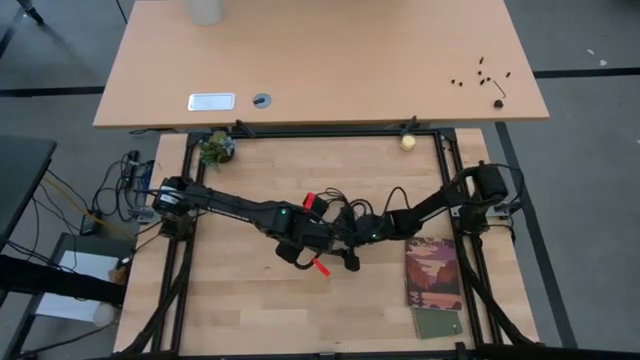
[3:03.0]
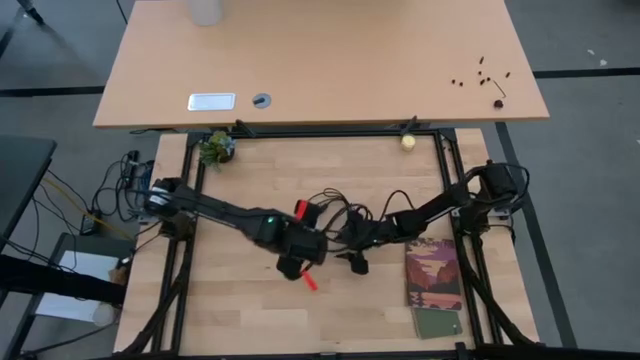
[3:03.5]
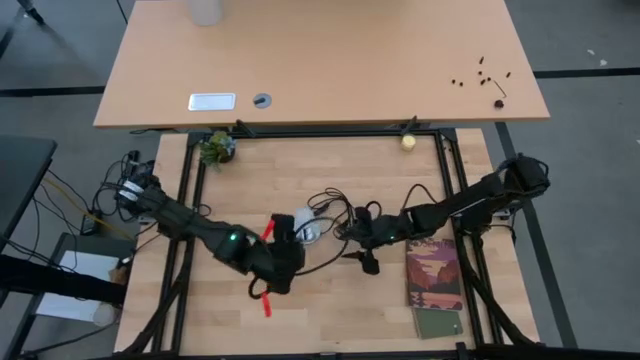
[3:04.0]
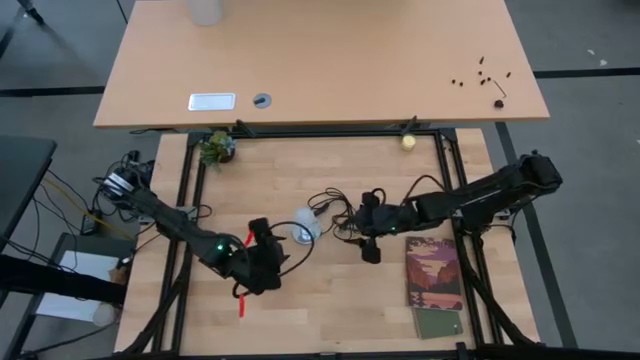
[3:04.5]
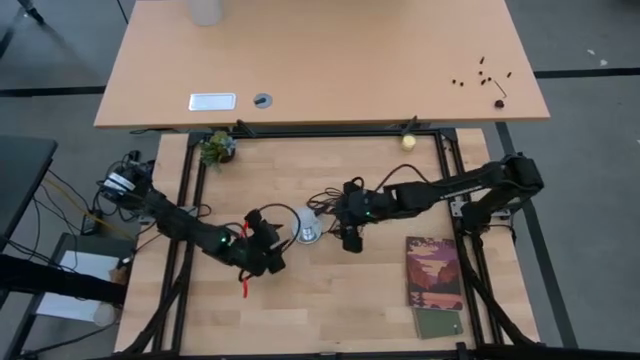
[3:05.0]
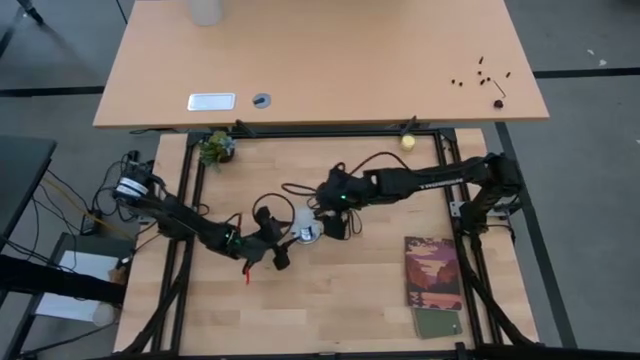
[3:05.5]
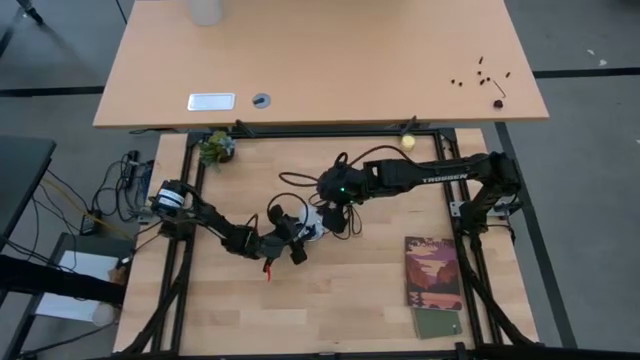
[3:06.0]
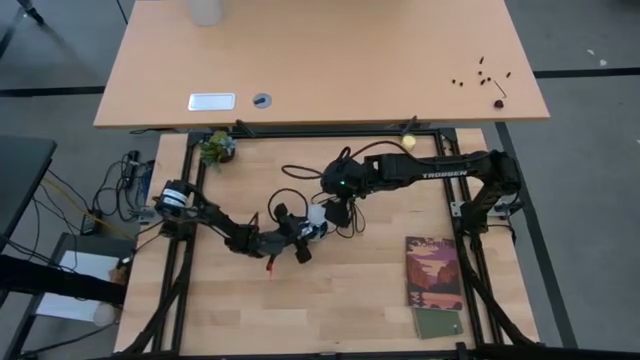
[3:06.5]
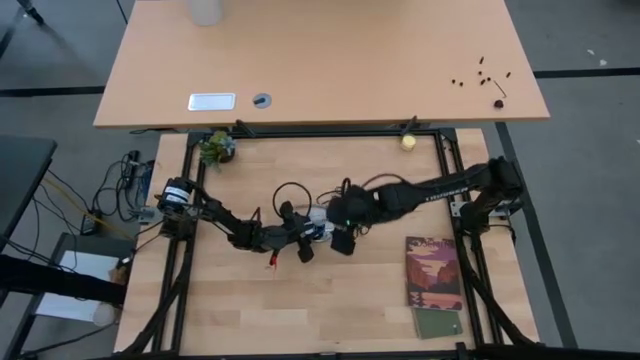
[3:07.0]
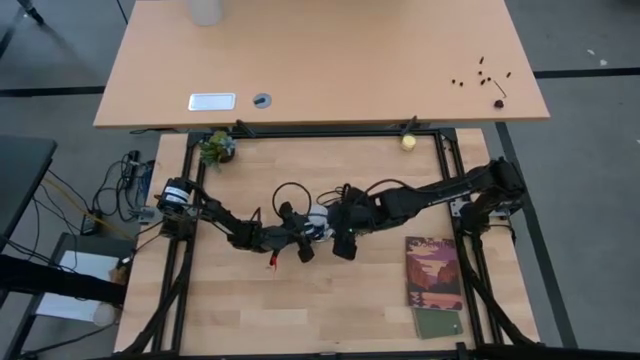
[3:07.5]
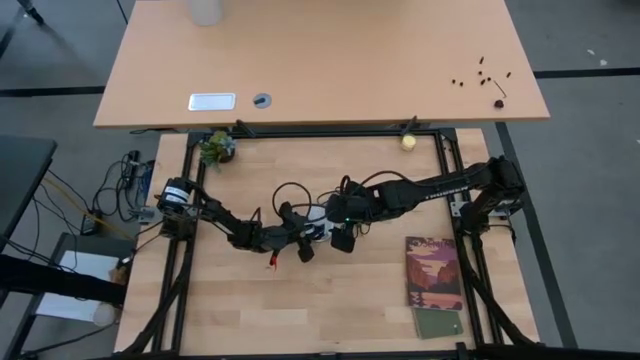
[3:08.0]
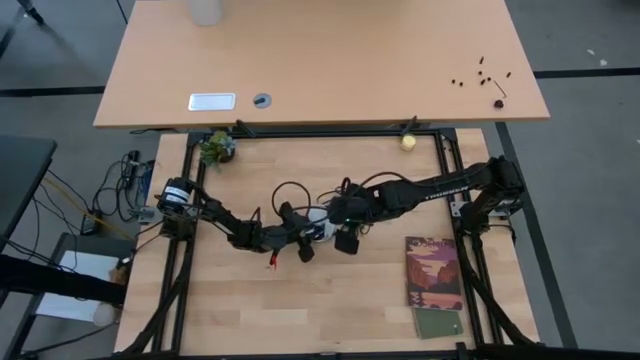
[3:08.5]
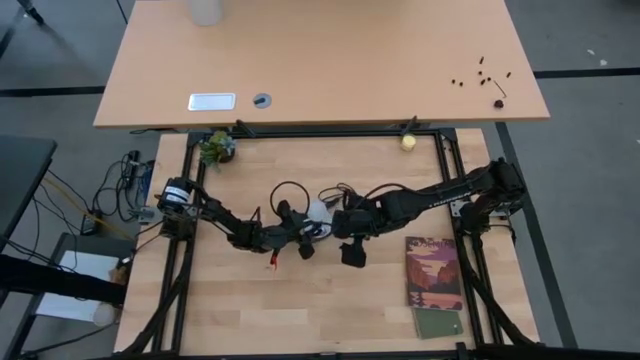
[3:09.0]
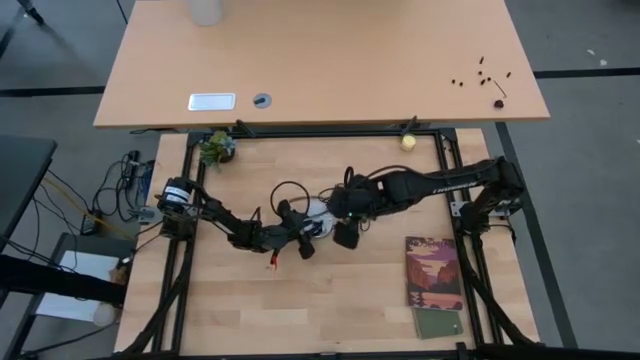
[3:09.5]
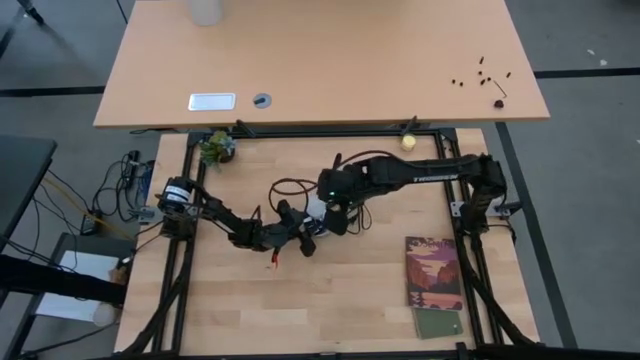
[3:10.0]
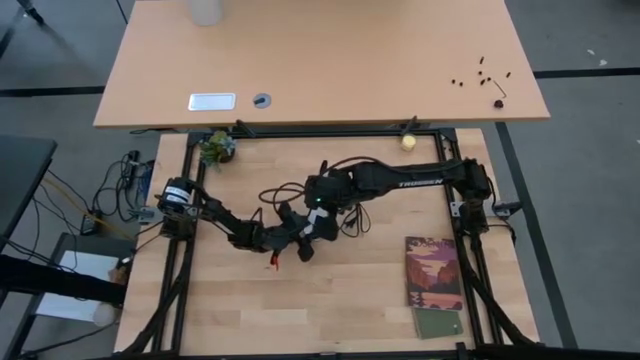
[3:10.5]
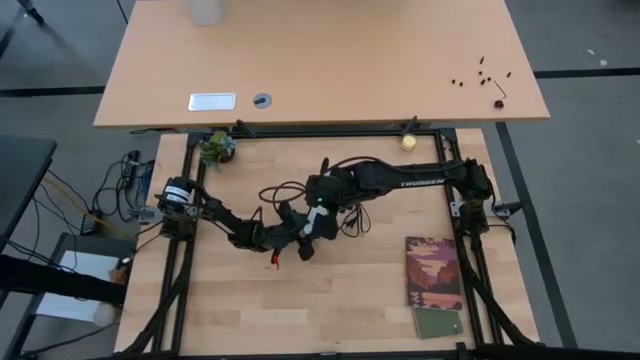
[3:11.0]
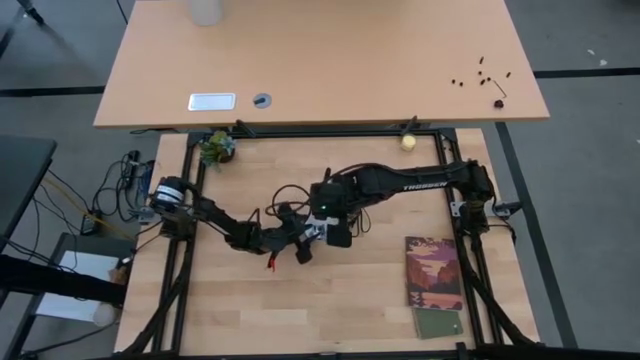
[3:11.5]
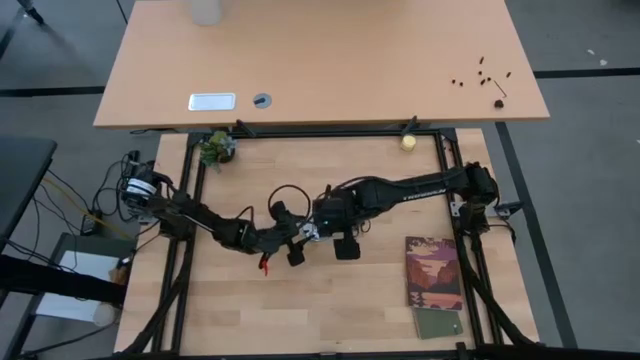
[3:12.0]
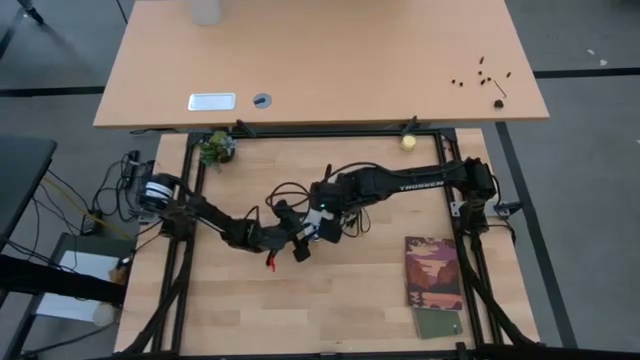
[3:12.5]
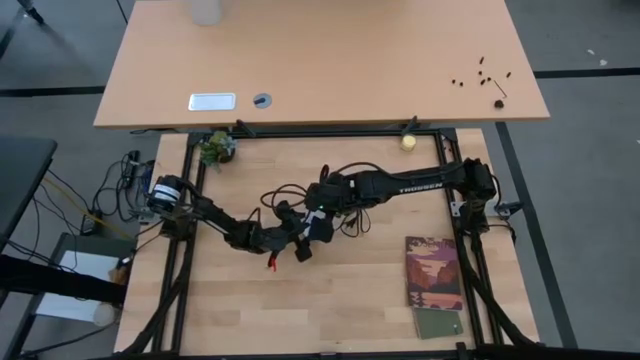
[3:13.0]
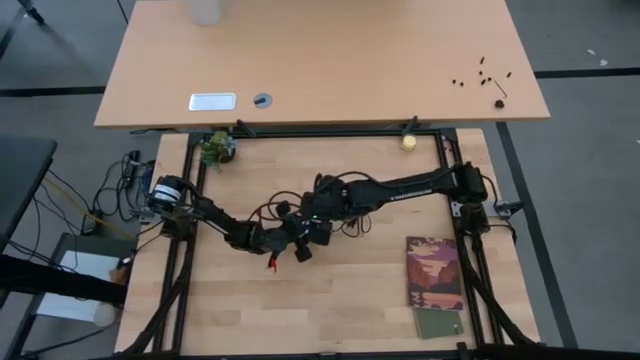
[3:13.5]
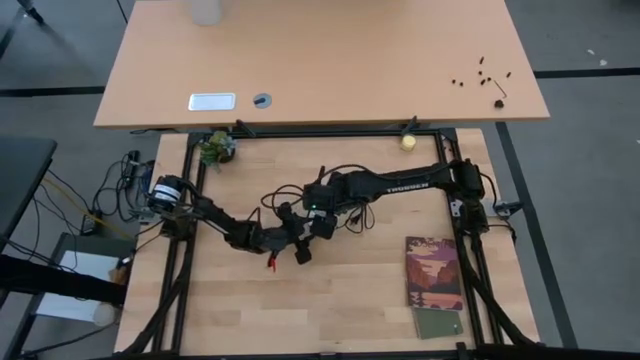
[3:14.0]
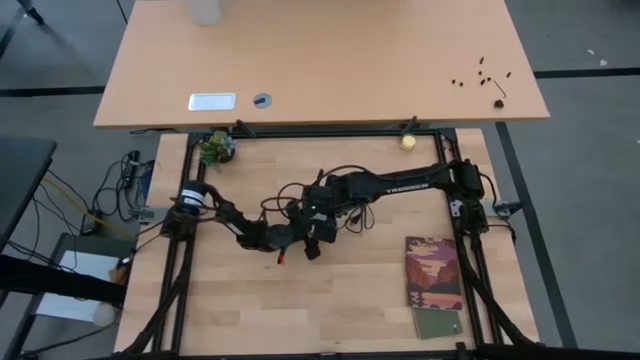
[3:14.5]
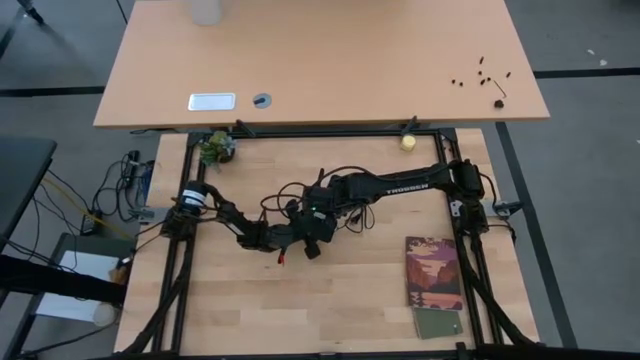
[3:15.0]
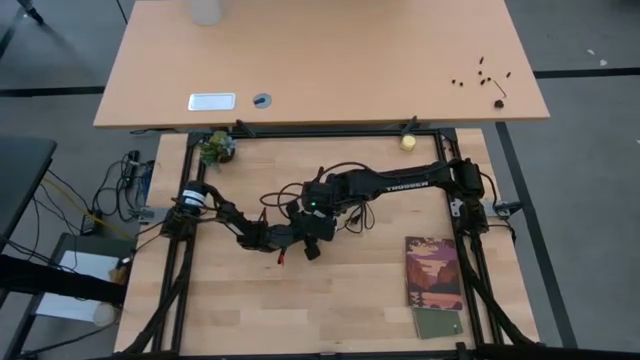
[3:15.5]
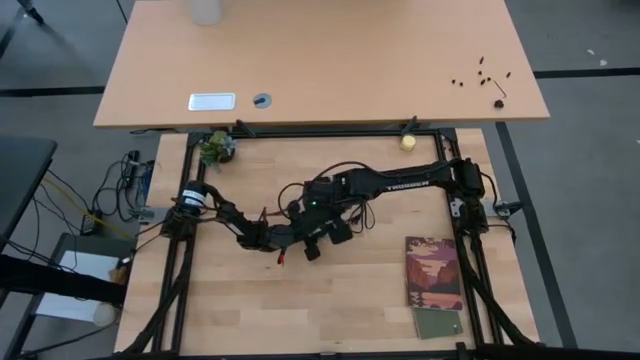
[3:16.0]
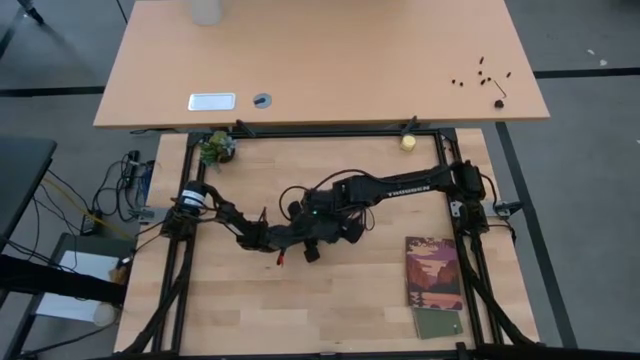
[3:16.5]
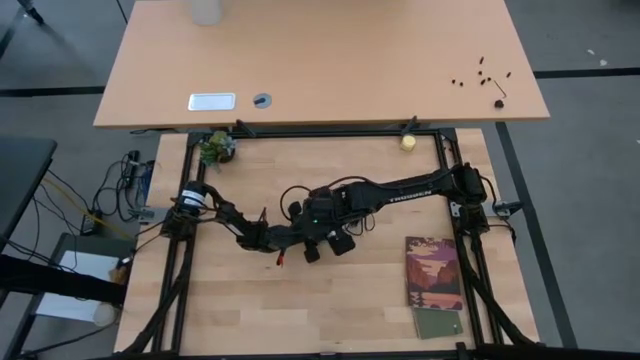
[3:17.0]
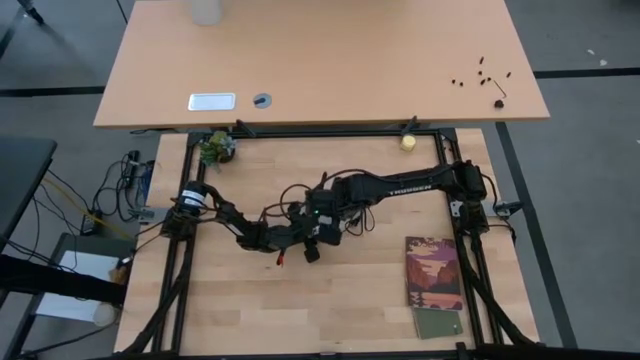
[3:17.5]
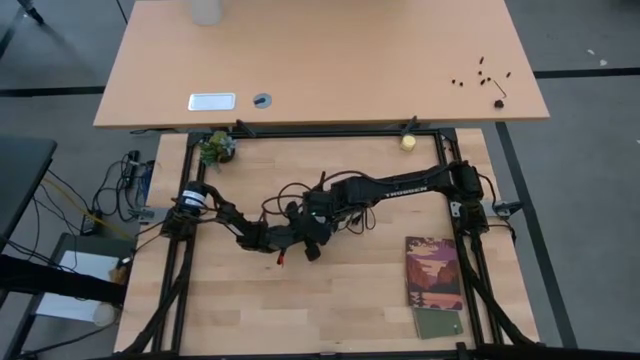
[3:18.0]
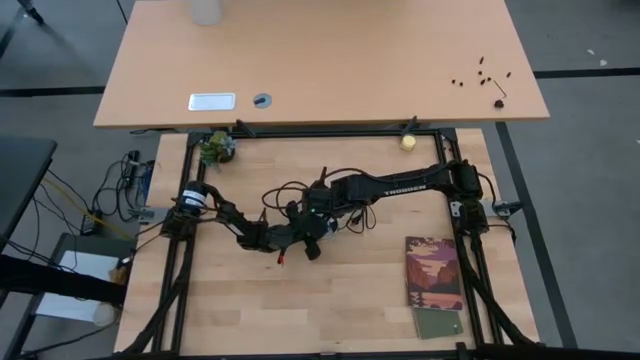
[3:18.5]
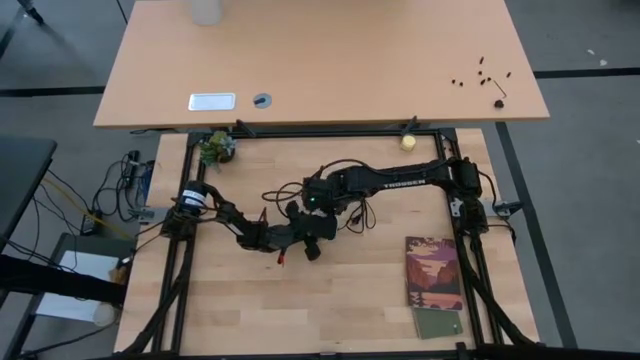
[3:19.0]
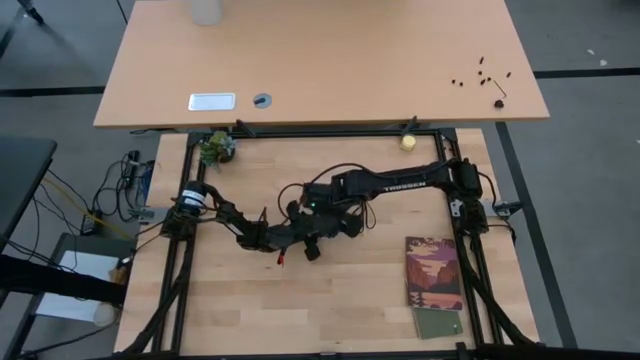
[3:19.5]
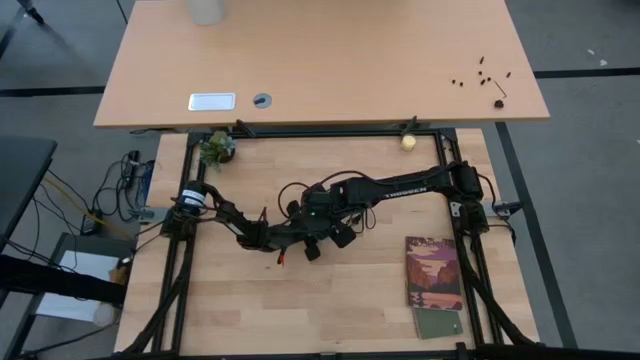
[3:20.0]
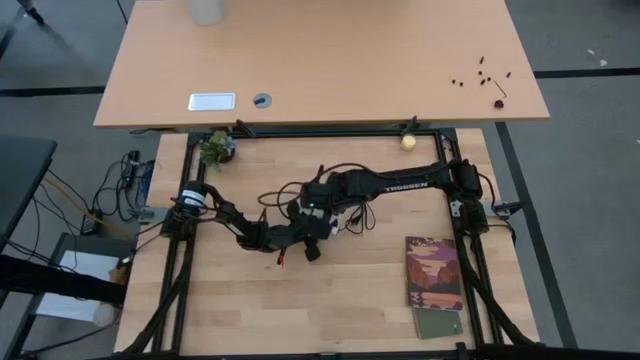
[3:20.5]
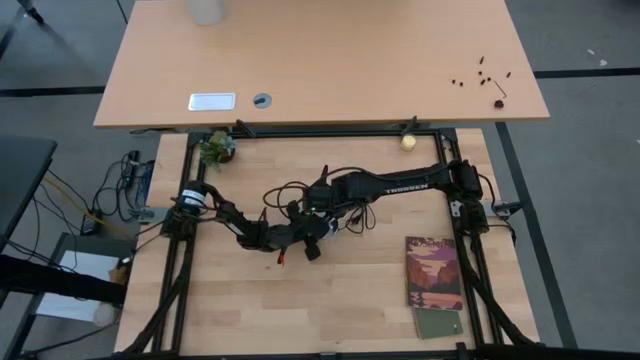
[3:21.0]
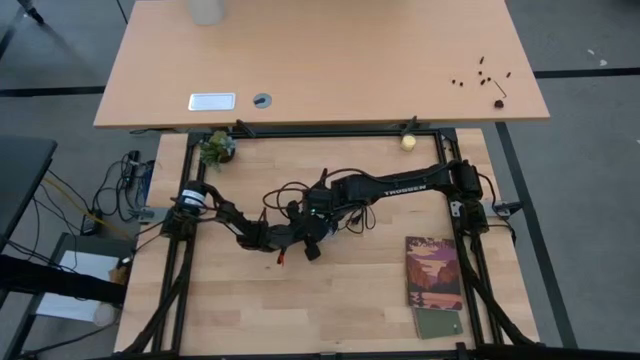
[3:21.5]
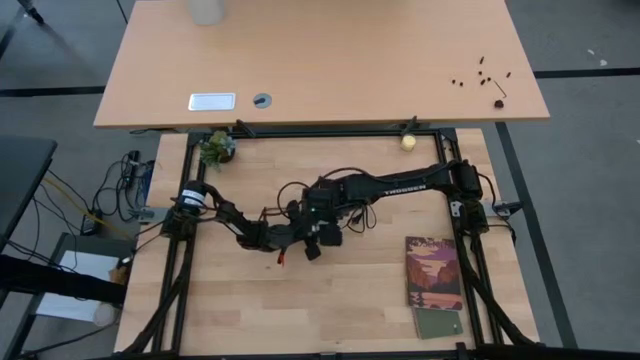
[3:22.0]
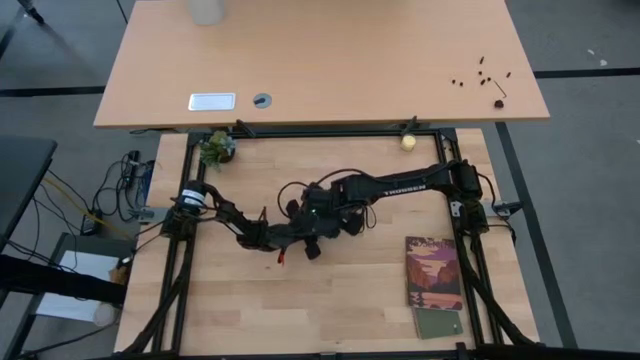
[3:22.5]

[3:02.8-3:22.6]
Task: Screw lightbulb
Remove the white lightbulb from the silver lamp

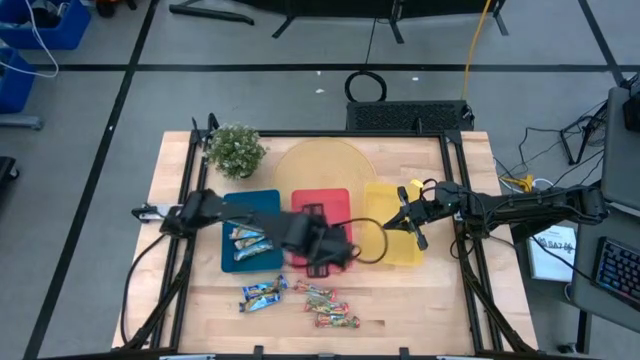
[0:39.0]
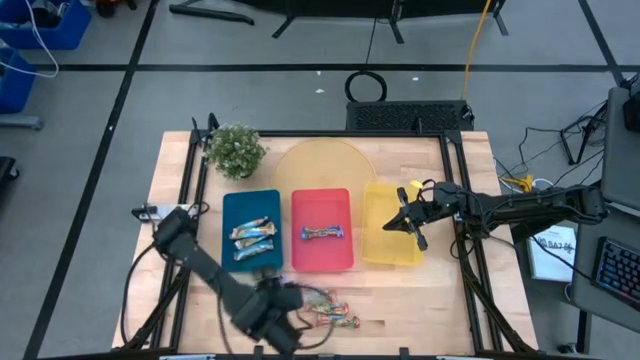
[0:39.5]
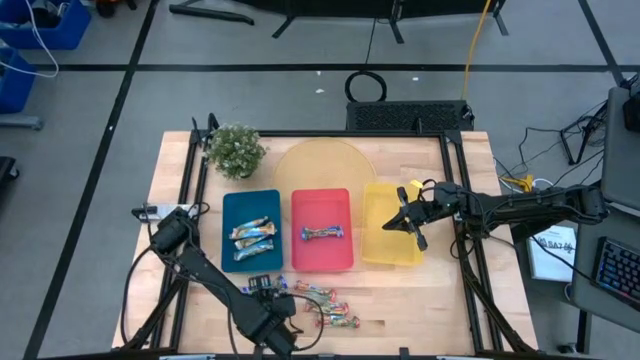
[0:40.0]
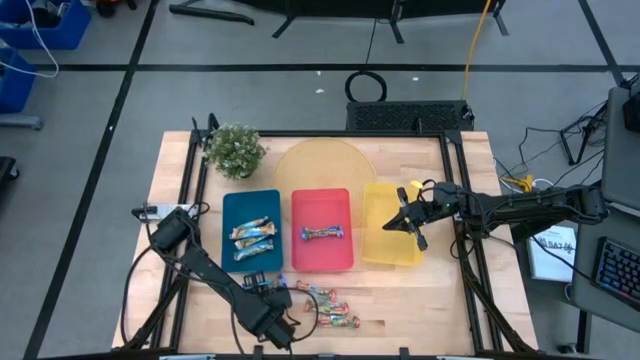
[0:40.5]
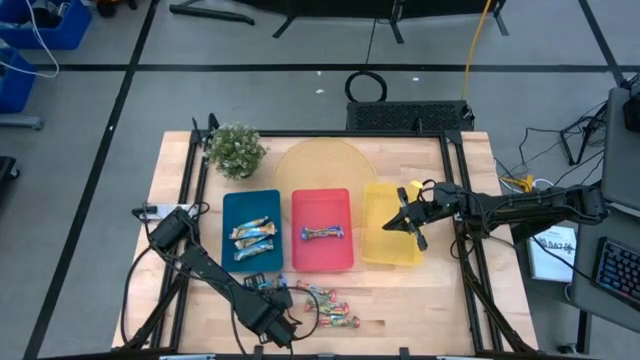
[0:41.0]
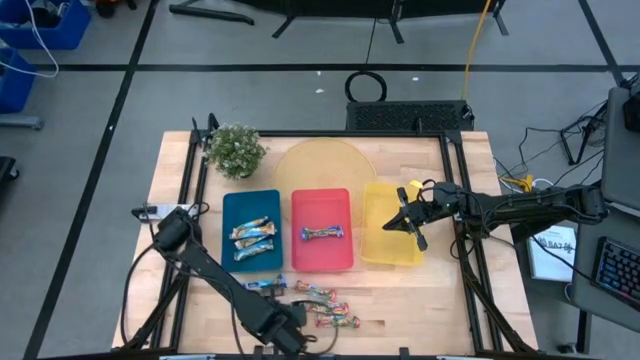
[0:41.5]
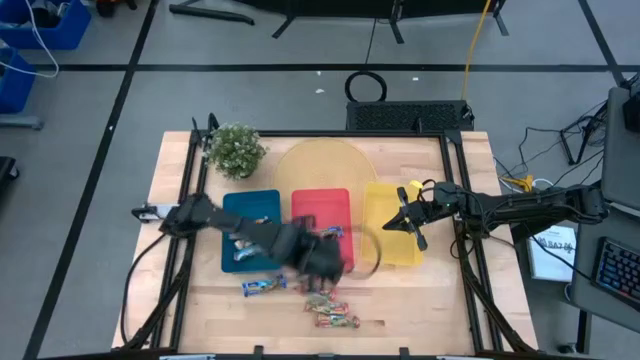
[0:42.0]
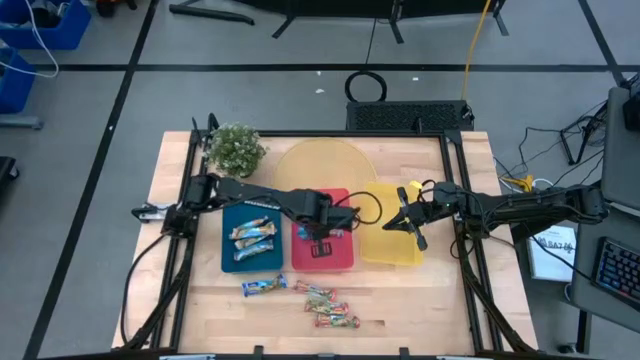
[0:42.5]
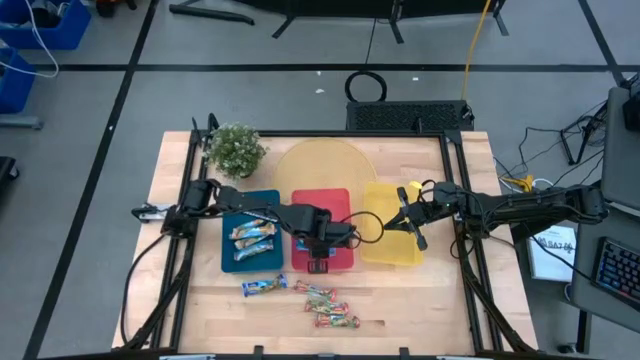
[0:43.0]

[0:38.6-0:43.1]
Task: Pick and place Granola Bars by type
Put the blue granola bar into the pink bin
